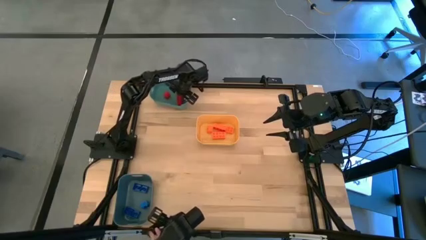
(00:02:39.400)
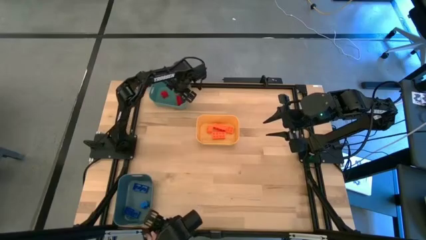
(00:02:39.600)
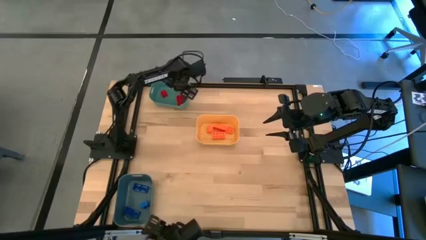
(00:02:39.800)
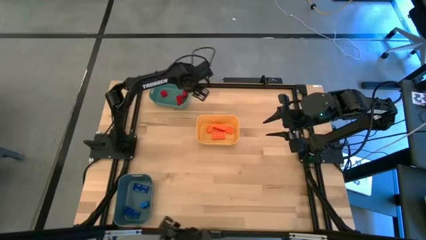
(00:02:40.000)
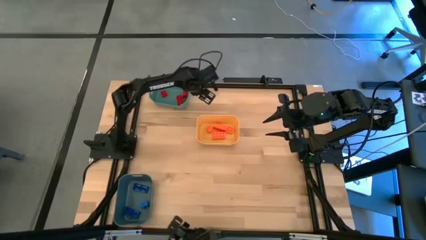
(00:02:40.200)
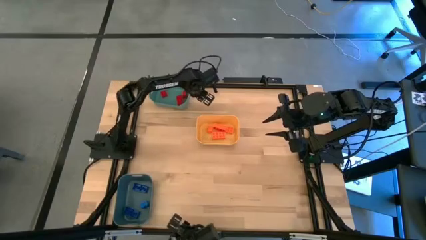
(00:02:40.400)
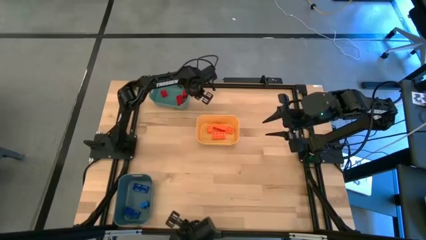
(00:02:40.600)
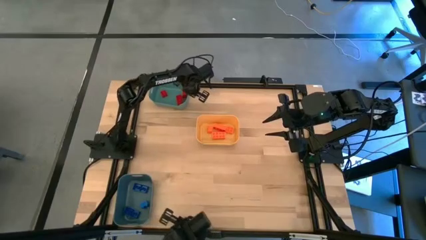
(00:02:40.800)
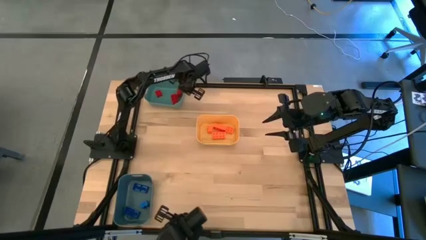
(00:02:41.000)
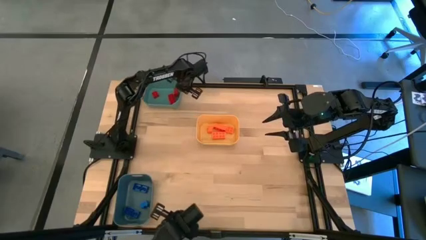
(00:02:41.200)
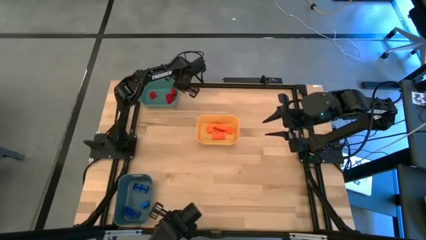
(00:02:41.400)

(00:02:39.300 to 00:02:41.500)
Task: Sort & place blocks by color
Adjust the green bin

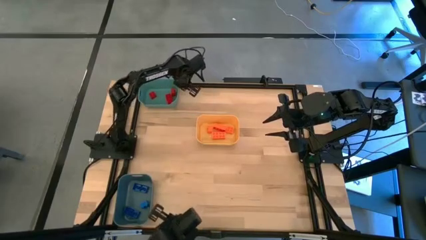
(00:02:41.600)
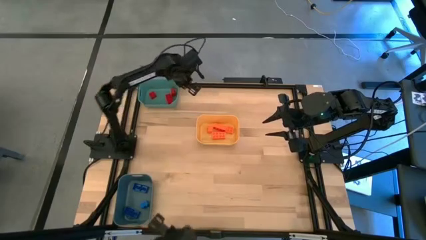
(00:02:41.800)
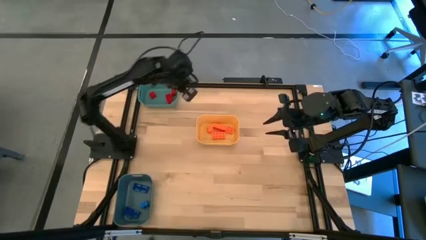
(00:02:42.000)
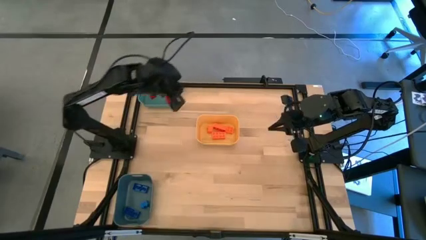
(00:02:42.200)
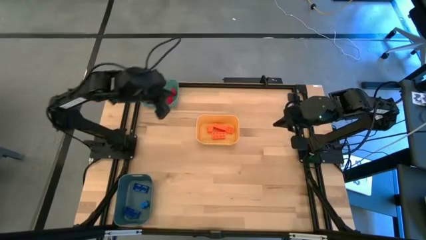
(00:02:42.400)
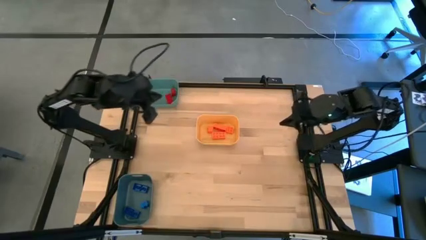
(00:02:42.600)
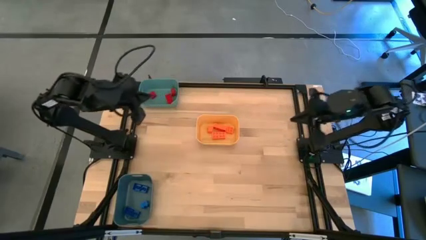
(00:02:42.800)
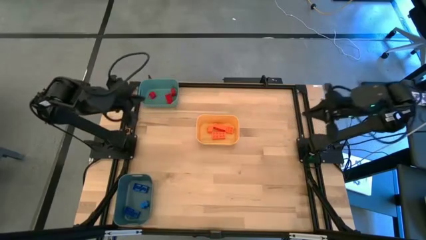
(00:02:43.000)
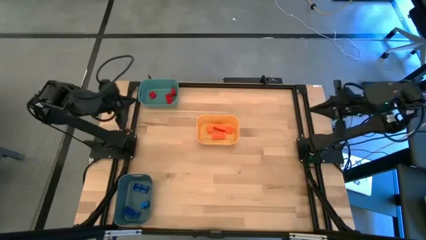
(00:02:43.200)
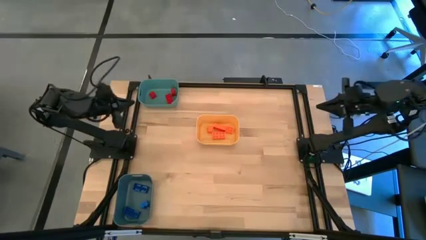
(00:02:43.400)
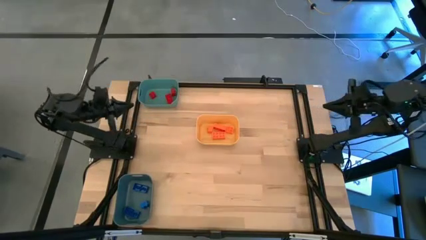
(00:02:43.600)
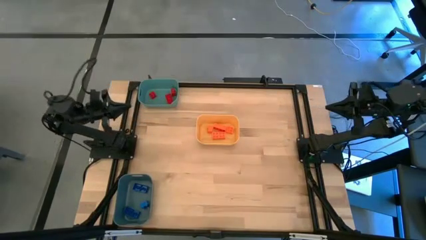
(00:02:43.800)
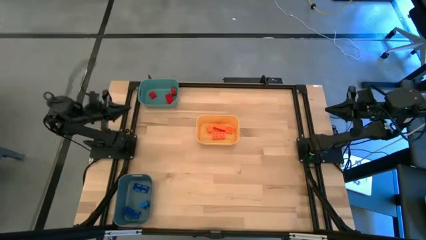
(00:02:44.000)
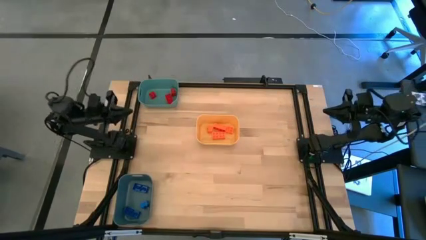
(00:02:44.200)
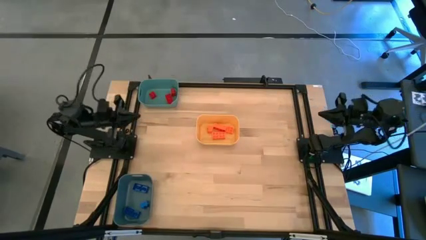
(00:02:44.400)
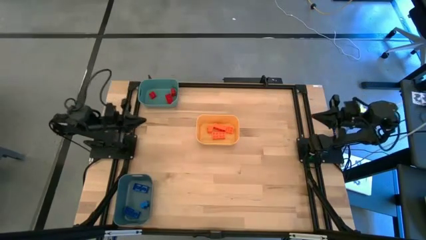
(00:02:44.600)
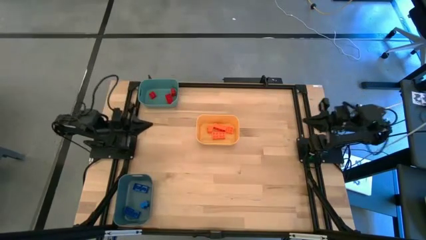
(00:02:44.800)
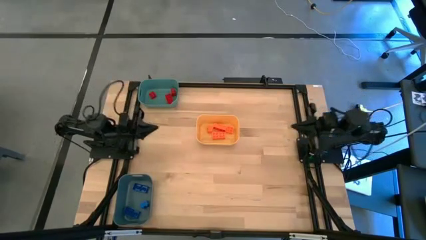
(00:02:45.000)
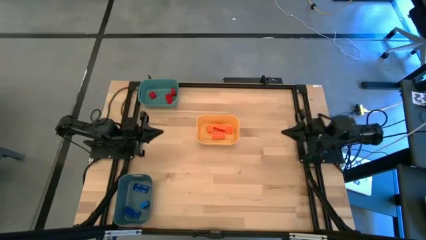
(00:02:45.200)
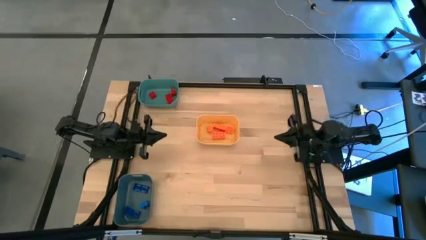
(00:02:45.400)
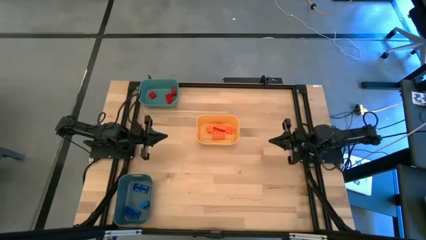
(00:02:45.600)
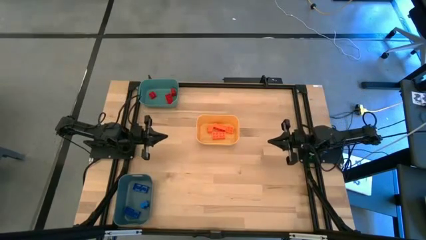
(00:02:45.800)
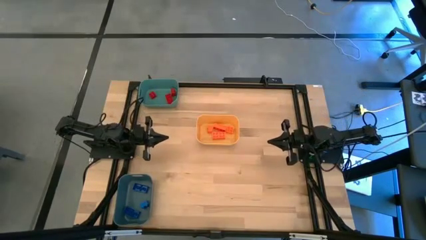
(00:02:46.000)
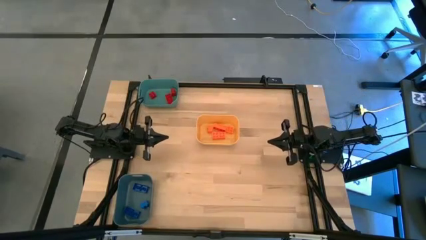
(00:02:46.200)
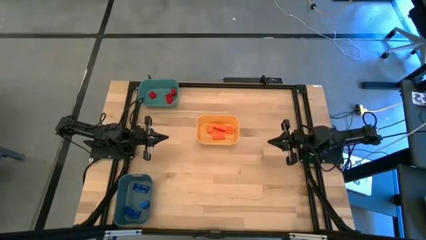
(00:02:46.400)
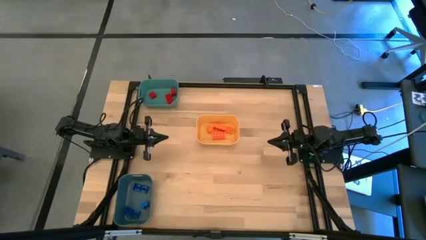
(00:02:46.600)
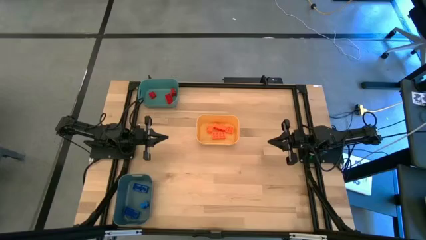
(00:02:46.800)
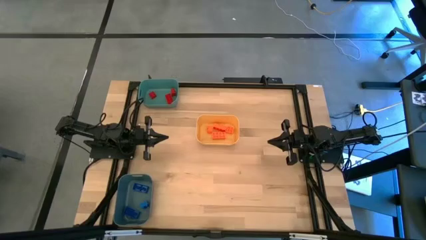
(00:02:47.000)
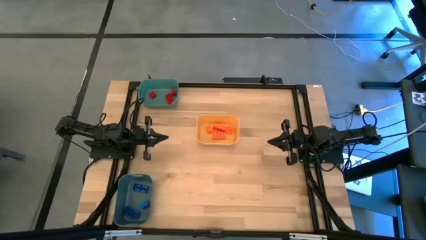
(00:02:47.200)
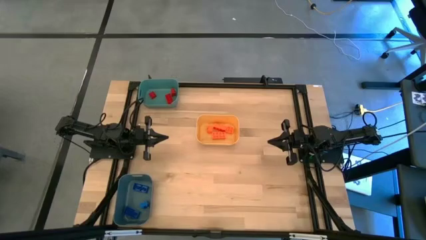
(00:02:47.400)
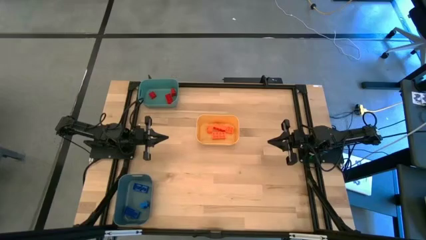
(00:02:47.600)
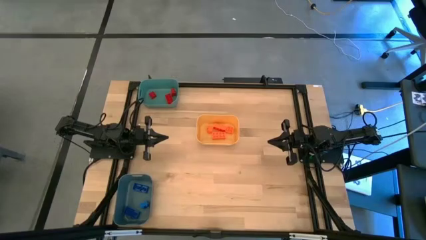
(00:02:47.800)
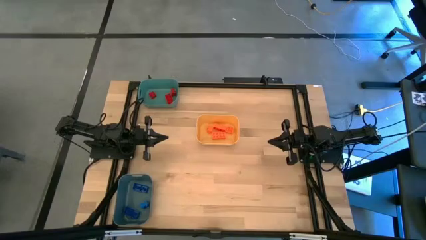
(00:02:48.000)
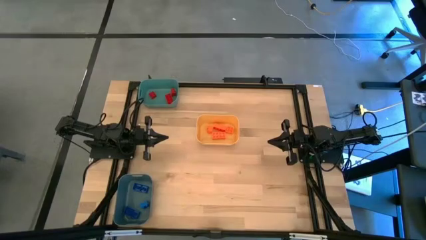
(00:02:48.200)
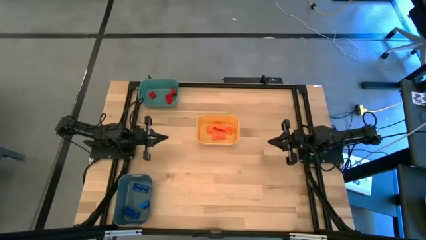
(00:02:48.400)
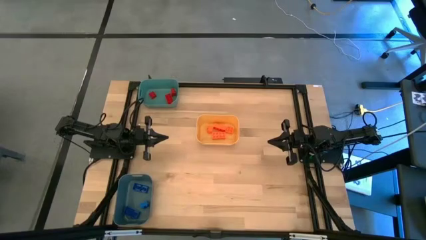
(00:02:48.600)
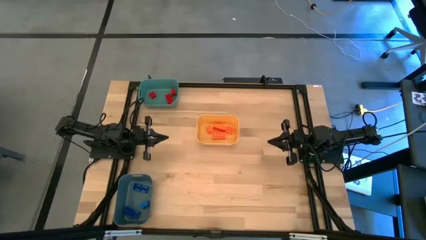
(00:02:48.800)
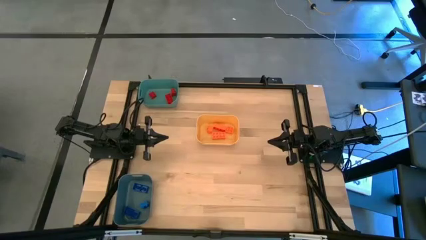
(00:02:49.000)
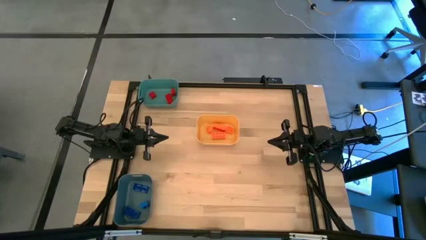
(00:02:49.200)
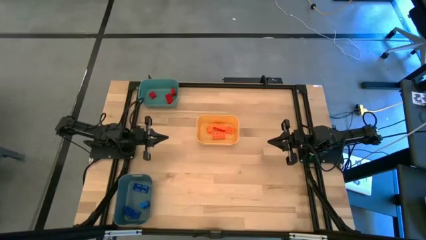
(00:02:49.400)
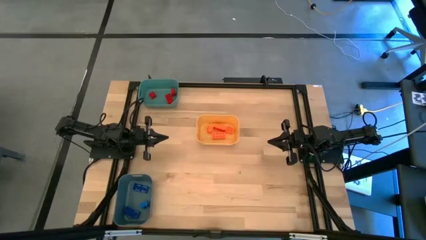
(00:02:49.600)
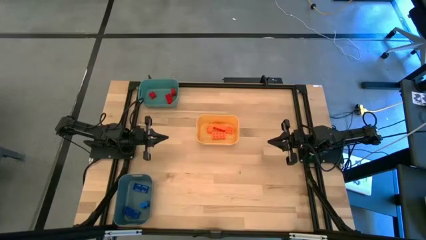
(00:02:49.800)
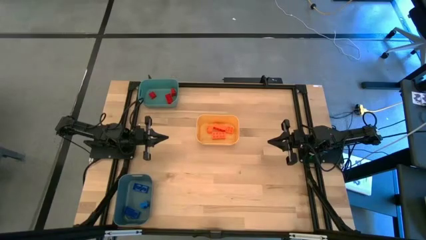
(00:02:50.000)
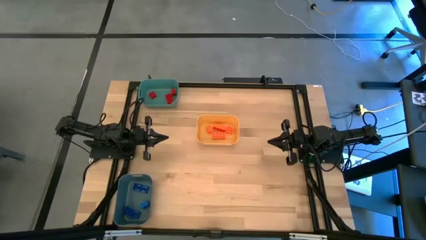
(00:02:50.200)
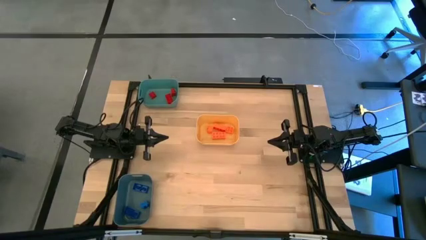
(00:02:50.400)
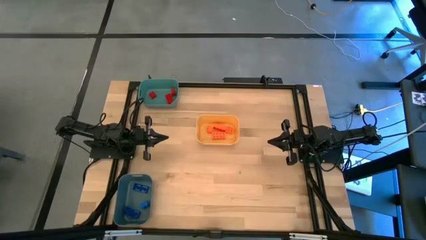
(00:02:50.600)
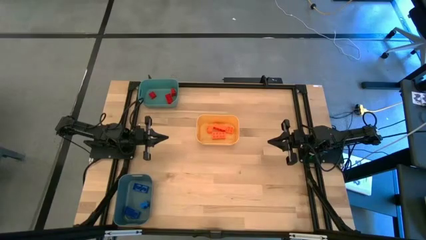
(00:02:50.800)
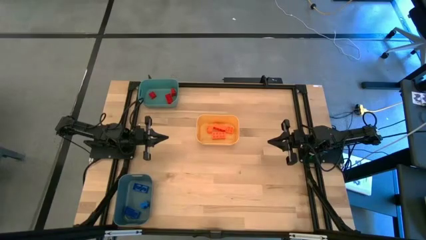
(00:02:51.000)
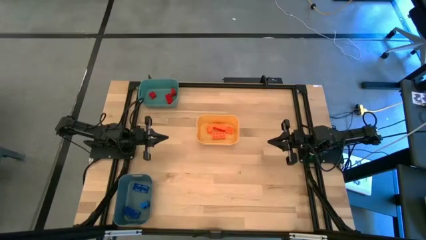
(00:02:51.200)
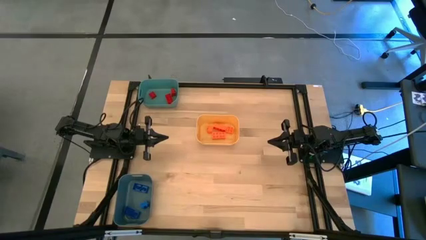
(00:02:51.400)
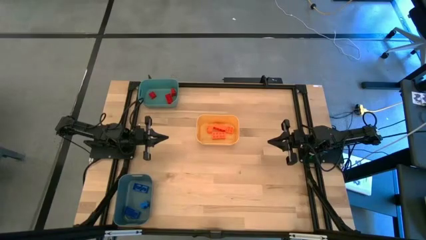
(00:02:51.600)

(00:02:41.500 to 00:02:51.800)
Return to Home Position

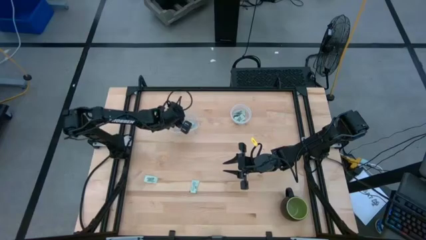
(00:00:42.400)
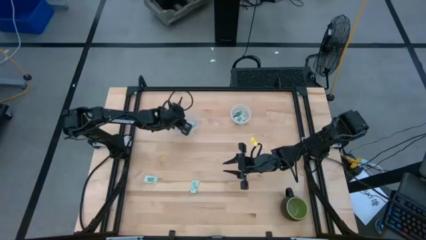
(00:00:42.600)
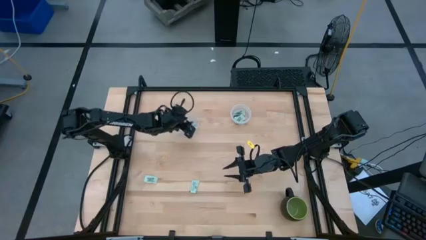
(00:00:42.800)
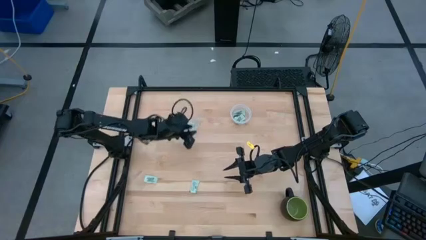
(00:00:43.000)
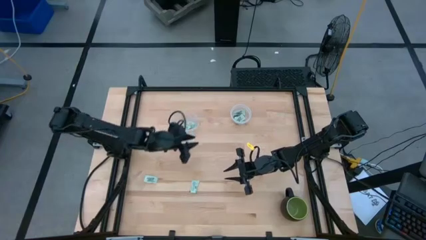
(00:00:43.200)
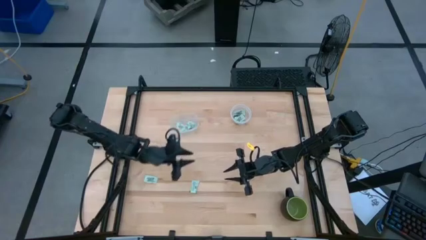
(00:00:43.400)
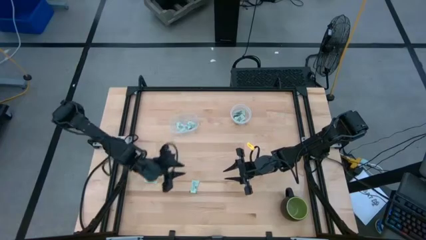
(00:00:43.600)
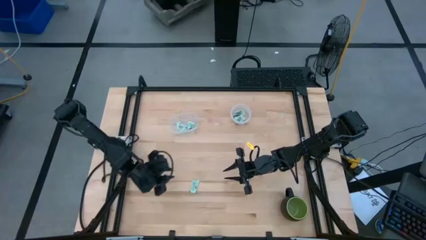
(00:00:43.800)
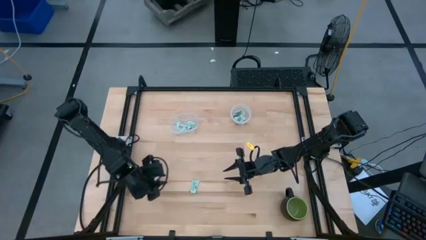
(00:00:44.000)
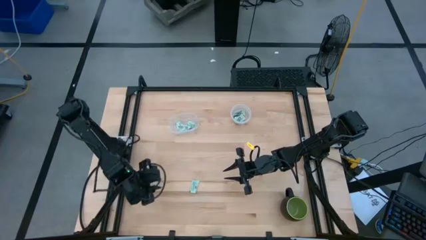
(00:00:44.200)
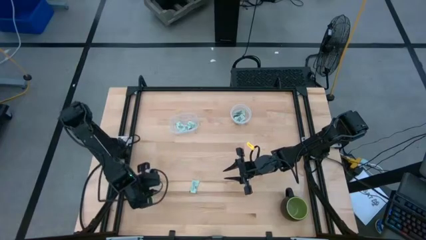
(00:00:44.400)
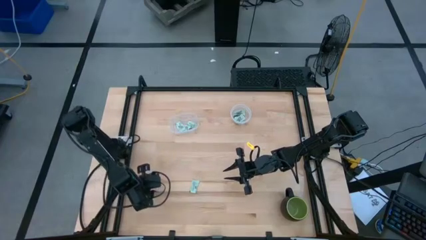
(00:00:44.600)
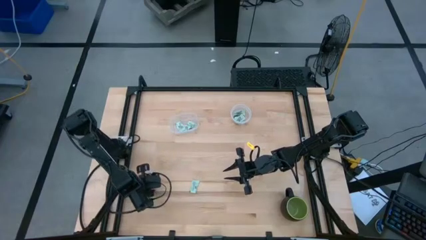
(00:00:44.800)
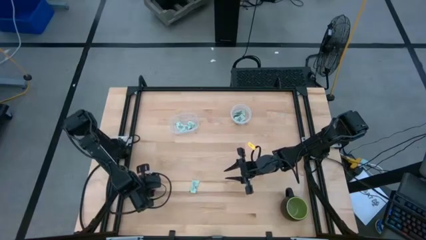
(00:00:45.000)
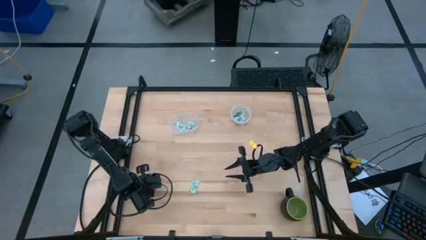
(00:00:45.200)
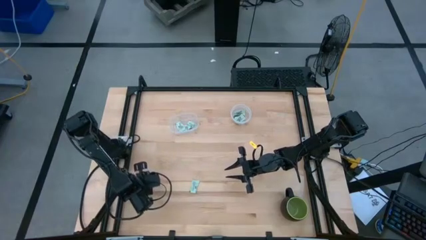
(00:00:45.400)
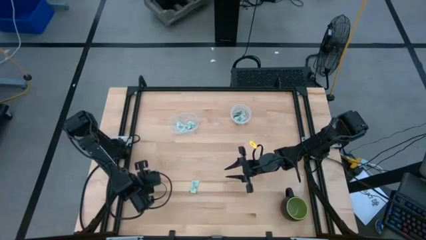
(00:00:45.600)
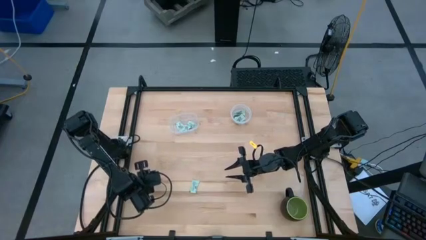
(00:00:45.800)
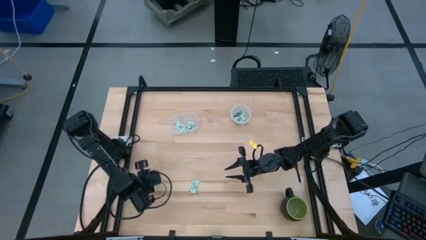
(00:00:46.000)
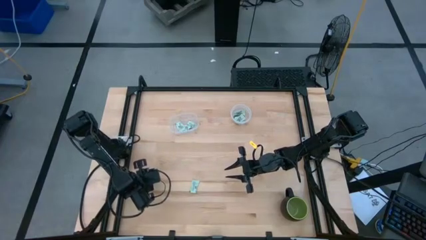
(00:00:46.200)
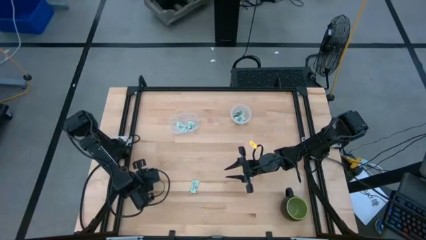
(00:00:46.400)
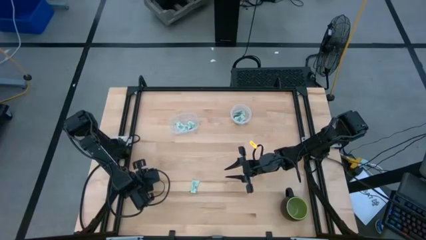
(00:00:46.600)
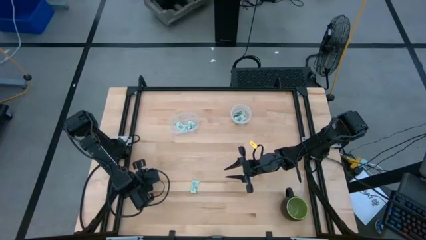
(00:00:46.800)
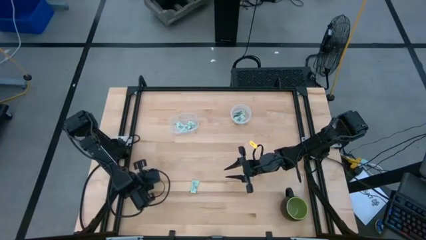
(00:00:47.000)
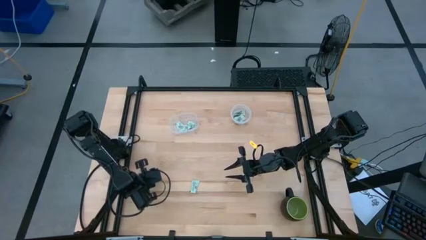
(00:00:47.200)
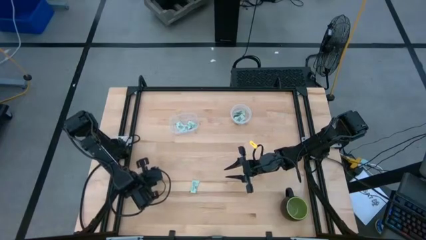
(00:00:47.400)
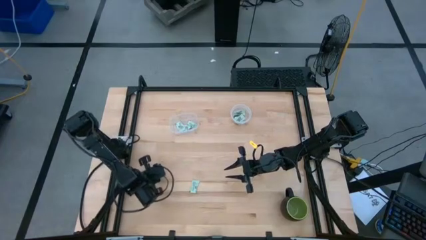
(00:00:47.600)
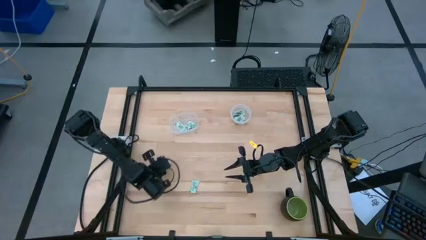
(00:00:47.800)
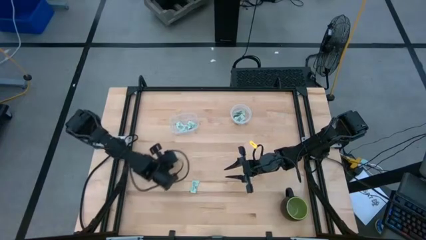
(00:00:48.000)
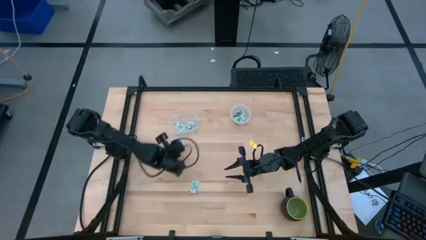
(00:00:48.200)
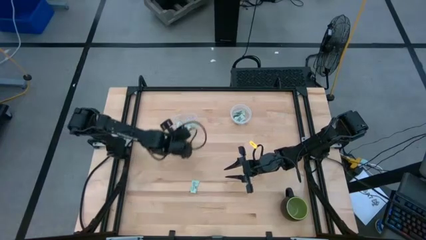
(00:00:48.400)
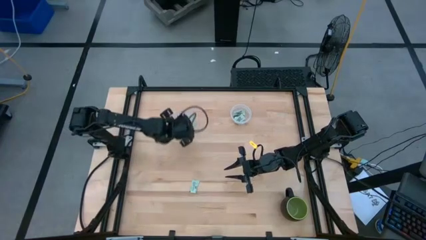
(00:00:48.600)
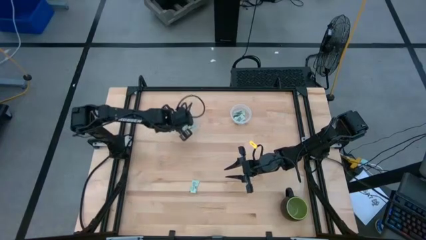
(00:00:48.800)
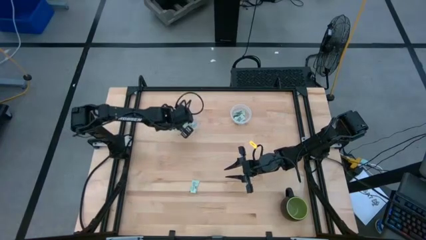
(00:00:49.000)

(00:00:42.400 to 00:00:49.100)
Task: Pick and place Stevia / Truvia into bins
Put the stevia packet into the left transparent container
